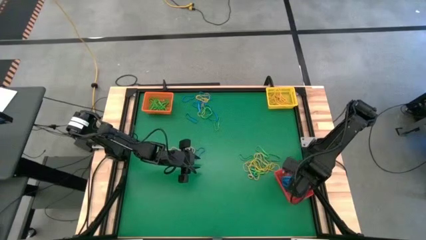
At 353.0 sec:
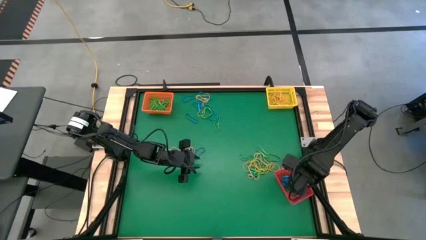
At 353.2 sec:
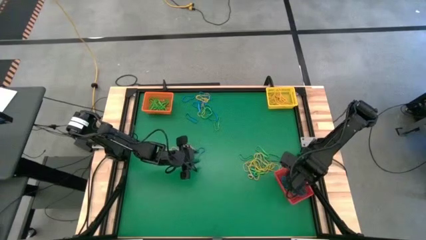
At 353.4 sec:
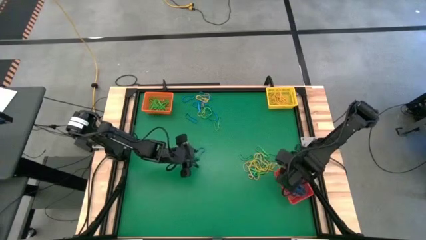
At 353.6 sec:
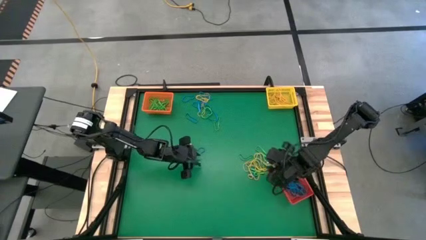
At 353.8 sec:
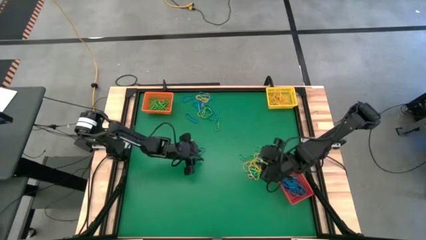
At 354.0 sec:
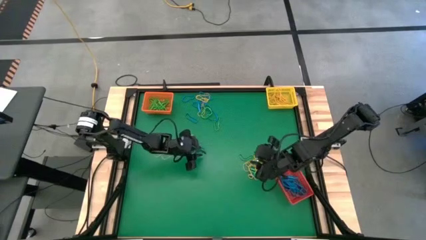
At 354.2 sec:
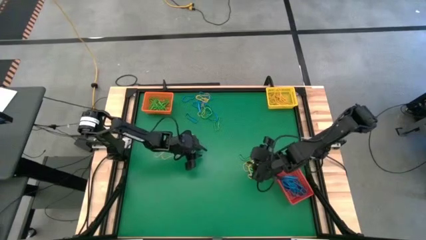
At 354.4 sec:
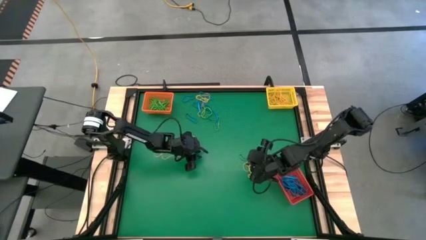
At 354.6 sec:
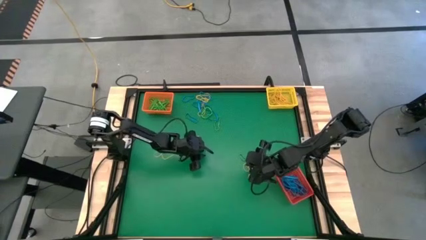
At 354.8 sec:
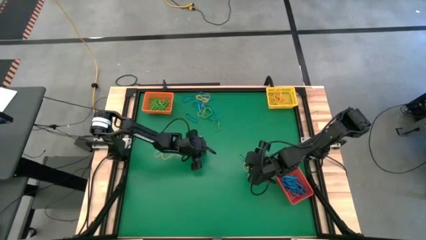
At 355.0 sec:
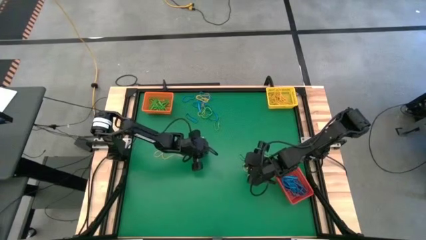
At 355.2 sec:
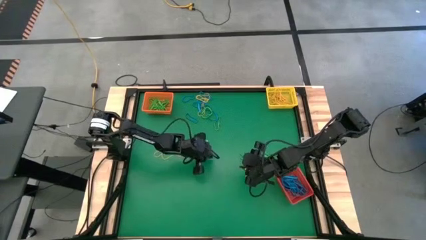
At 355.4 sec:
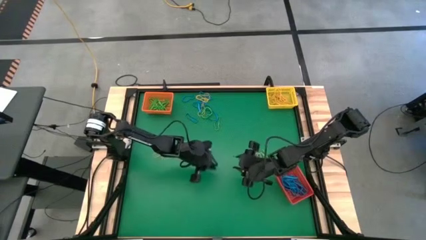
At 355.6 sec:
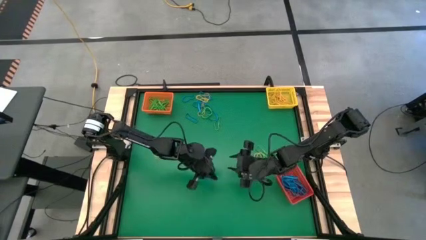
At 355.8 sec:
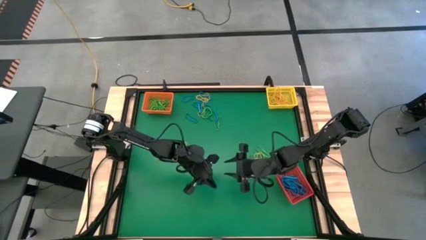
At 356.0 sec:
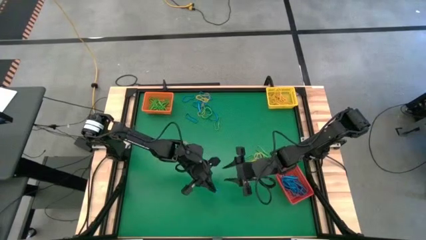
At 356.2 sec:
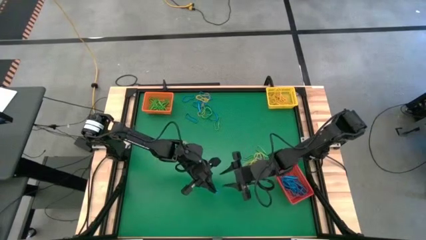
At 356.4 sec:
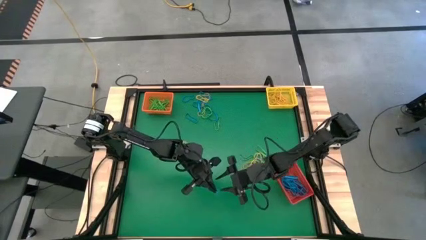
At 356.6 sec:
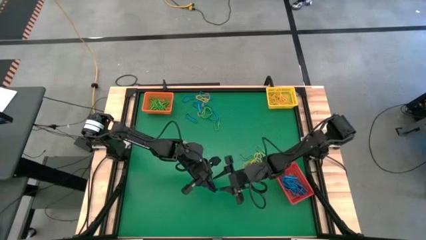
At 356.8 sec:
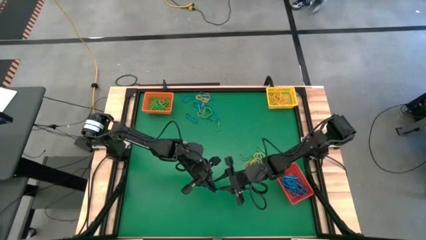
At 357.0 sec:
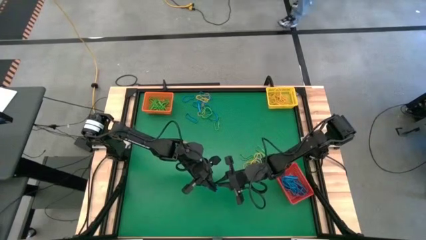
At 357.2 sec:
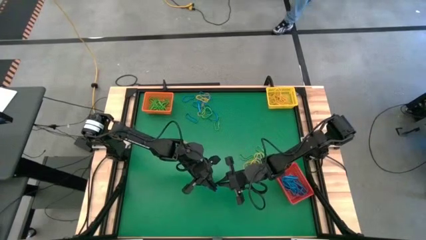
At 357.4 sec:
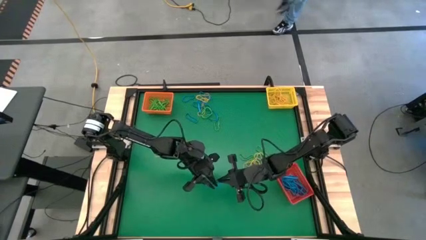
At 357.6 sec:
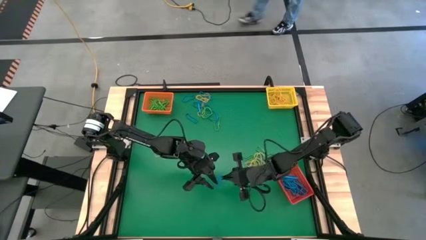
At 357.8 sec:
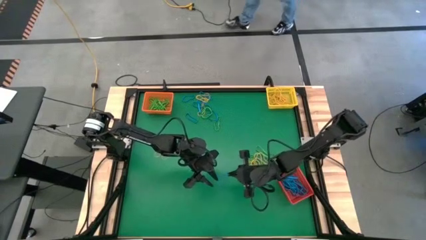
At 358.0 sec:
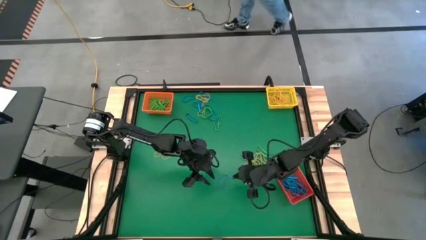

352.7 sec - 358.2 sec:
Task: Sort rubber bands into baskets
Put the blue rubber band into the red bin

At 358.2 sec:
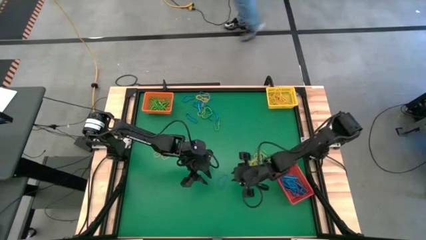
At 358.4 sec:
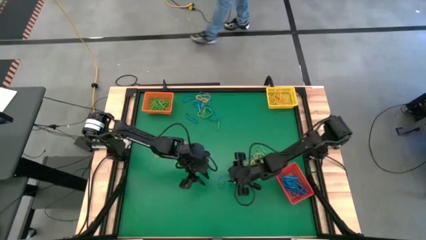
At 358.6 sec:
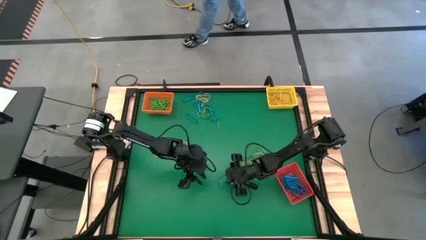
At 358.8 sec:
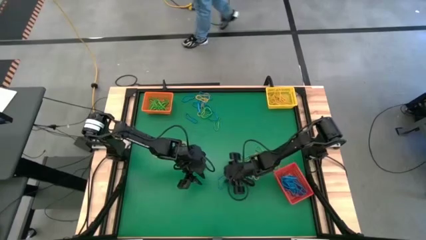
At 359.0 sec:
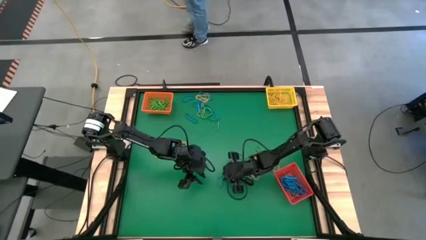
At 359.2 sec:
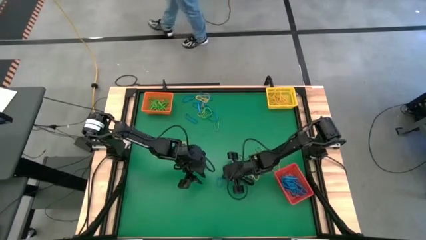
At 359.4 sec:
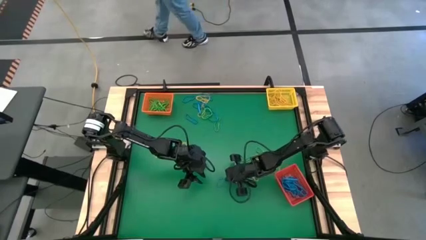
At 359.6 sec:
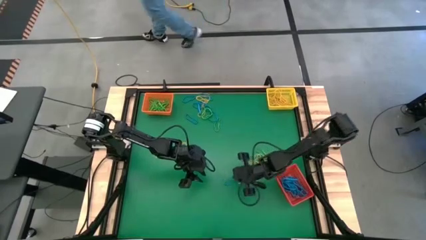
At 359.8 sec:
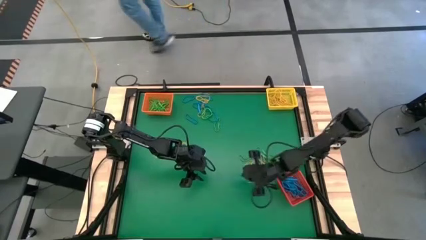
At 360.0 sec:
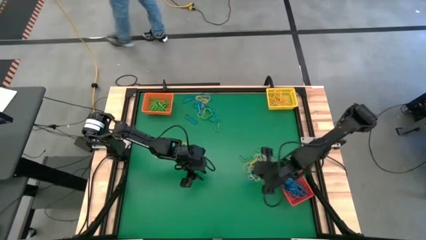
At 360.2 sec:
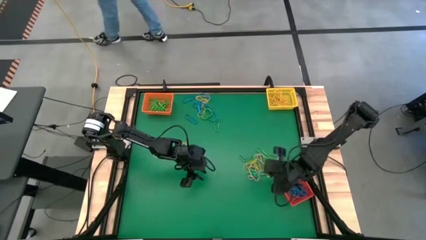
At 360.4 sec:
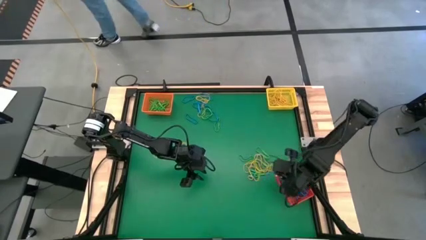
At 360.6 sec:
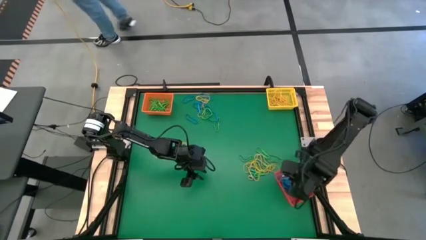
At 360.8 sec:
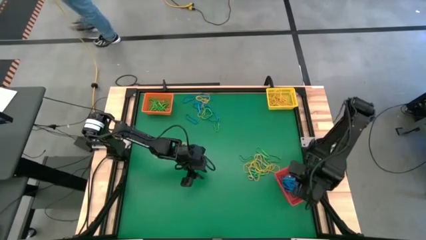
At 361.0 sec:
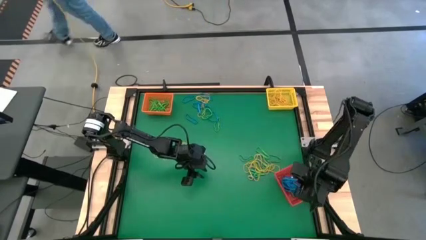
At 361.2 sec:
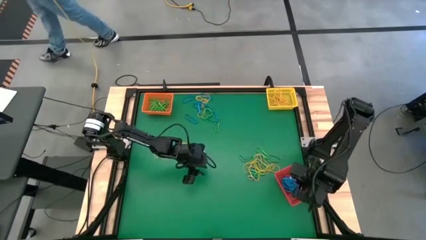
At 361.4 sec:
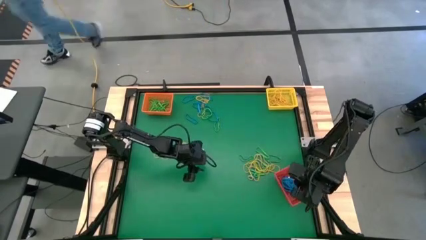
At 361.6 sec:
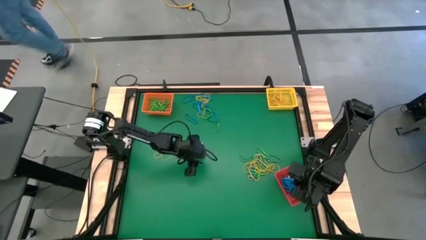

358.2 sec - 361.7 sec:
Put the blue rubber band into the red bin

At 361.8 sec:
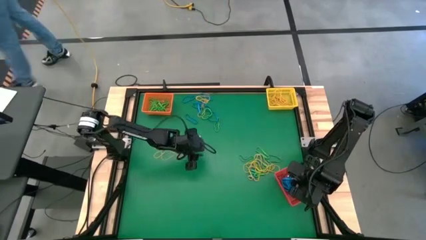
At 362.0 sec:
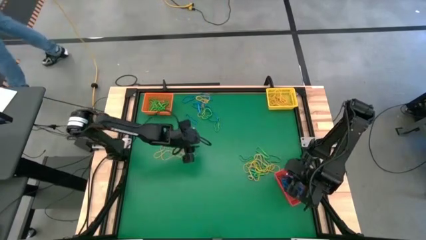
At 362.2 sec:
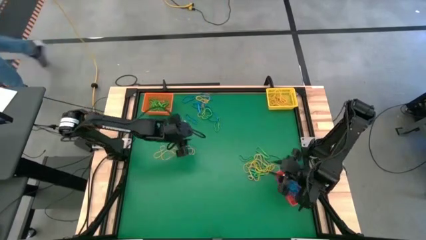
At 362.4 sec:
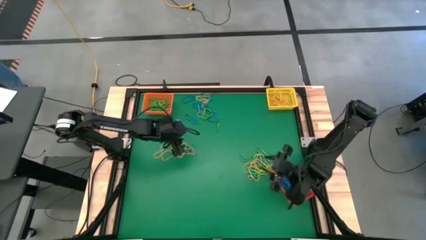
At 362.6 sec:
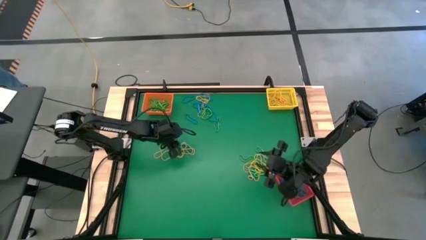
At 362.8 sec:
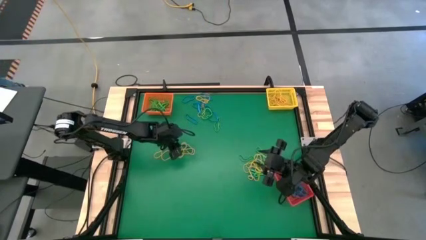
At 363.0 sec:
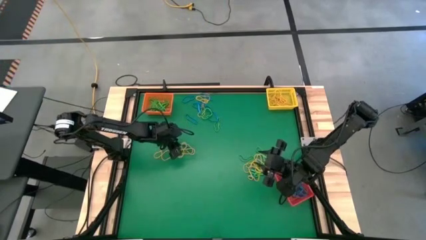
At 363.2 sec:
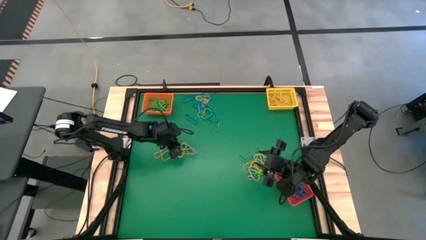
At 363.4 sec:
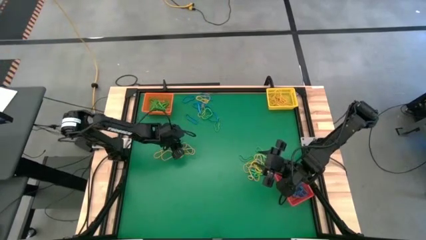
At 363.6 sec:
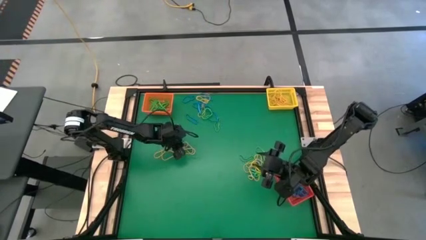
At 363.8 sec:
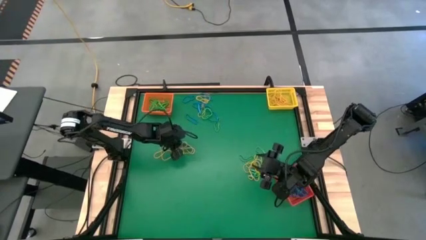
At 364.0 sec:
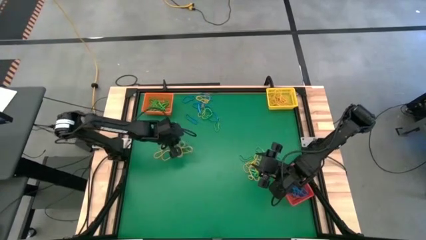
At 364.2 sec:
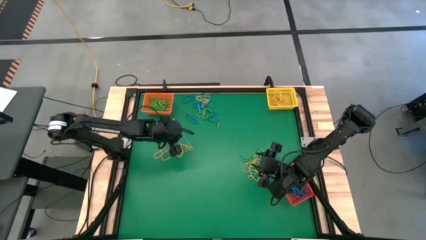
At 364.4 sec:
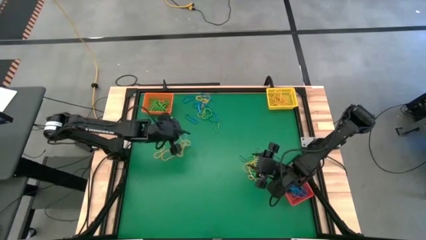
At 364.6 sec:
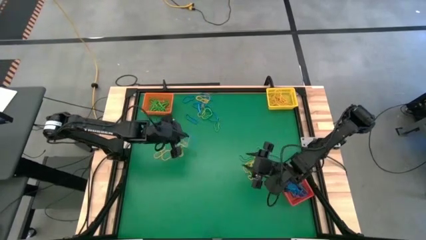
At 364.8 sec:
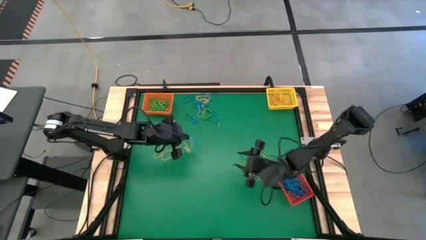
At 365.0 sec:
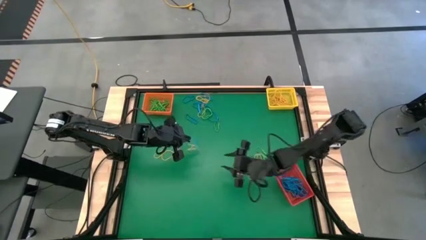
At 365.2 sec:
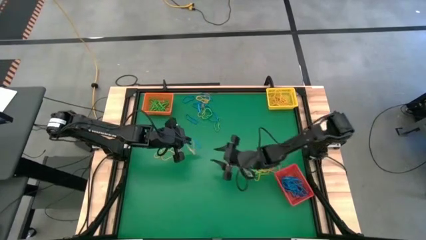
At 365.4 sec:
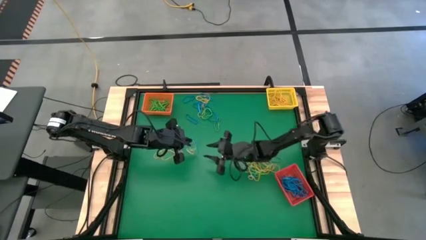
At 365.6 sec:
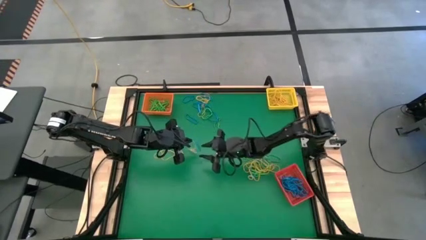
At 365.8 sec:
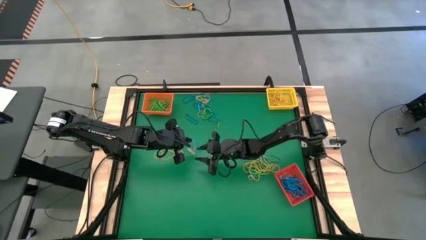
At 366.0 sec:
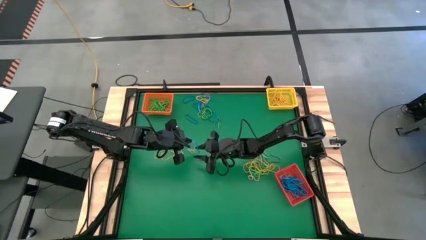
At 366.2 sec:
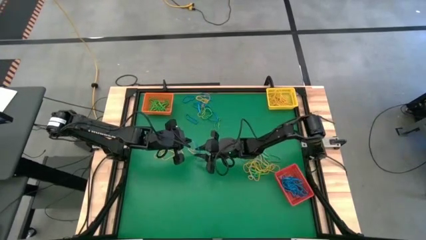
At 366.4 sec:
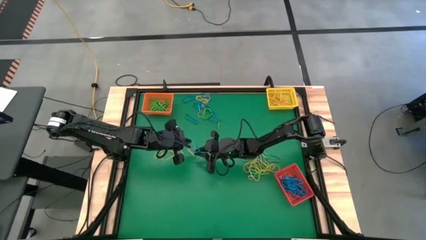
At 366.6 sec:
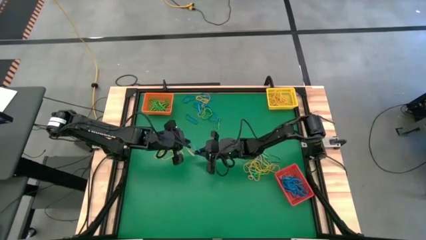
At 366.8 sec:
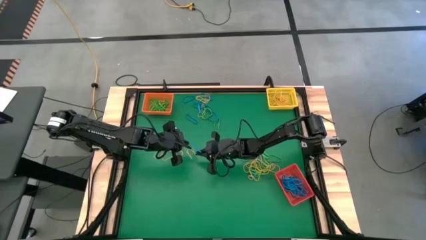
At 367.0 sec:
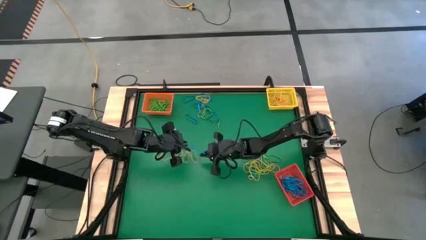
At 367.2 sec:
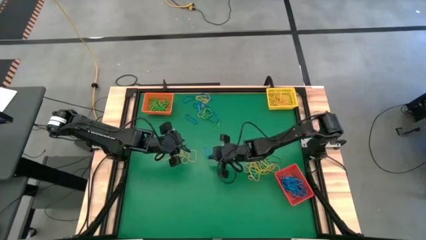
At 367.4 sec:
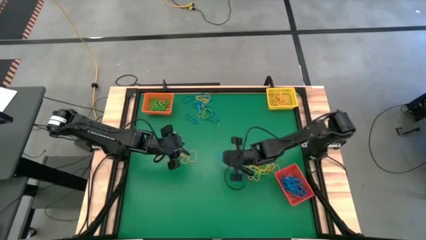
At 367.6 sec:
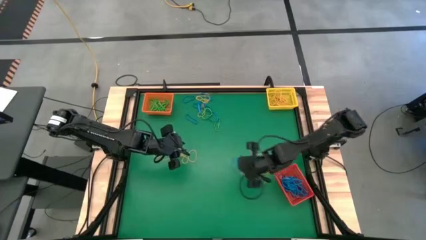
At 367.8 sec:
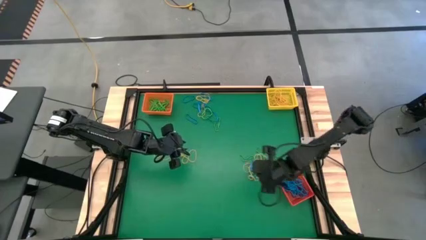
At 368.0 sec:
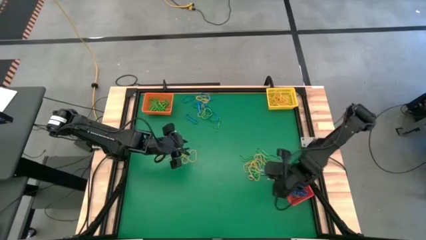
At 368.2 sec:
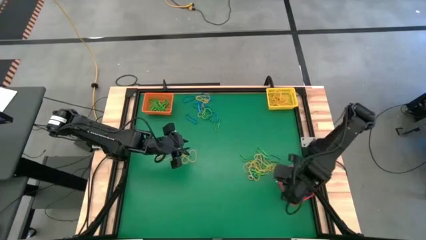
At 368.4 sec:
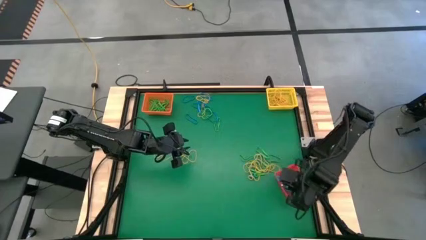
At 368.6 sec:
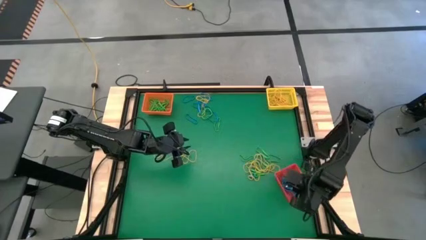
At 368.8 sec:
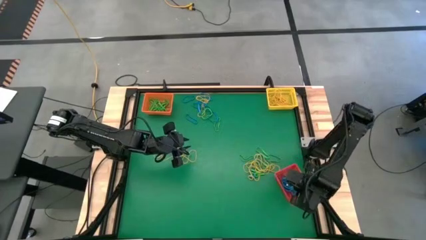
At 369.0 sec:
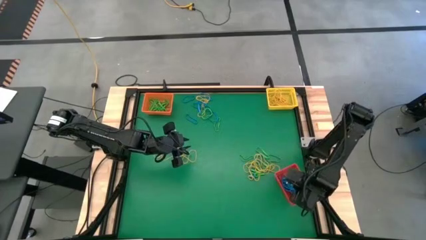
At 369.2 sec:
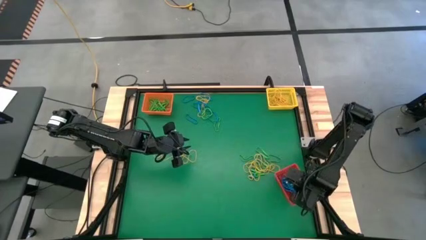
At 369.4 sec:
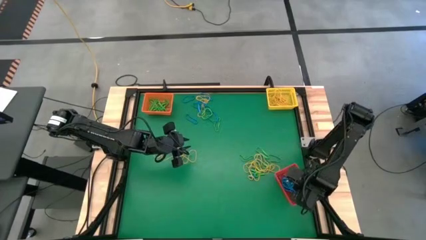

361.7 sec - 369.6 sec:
Put the blue rubber band into the red bin
